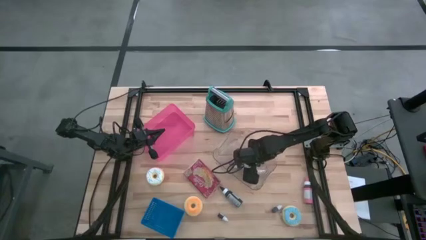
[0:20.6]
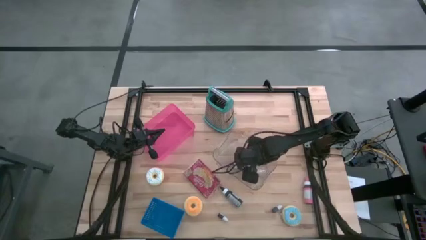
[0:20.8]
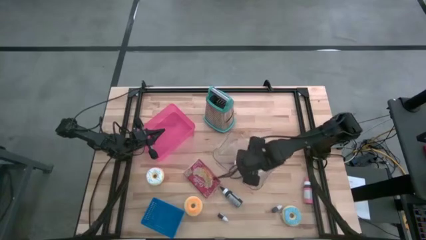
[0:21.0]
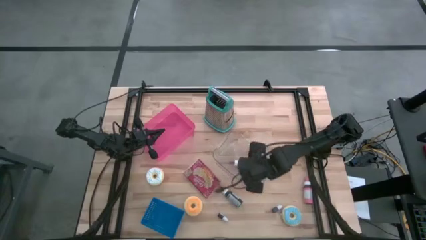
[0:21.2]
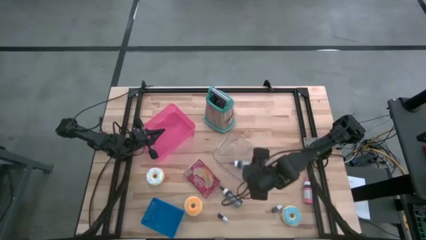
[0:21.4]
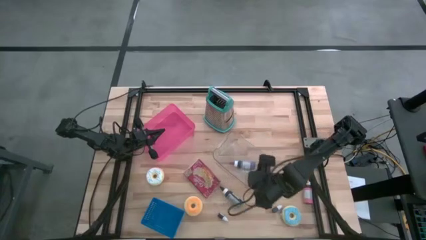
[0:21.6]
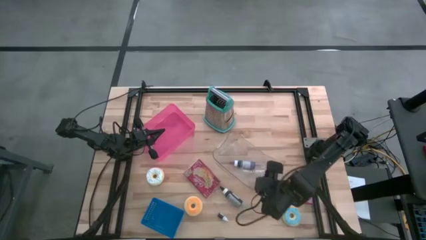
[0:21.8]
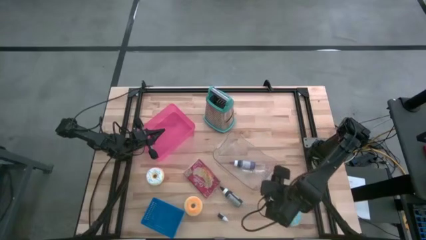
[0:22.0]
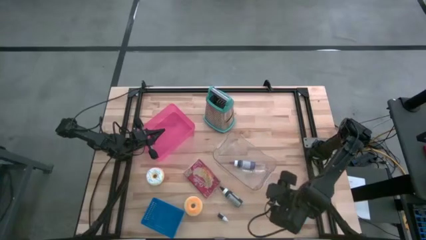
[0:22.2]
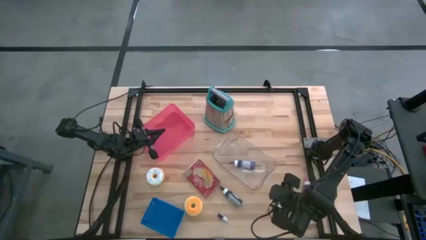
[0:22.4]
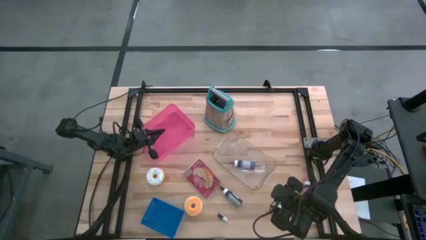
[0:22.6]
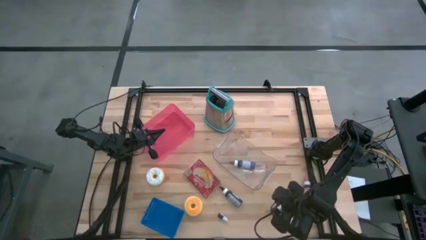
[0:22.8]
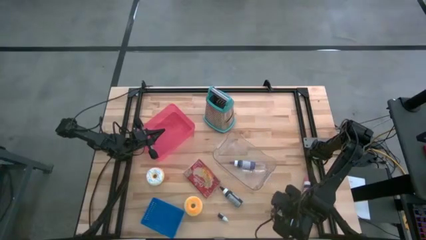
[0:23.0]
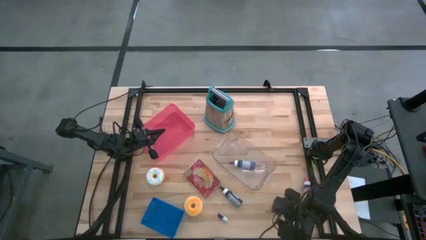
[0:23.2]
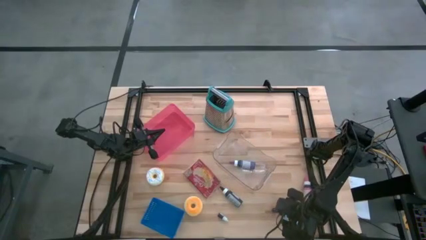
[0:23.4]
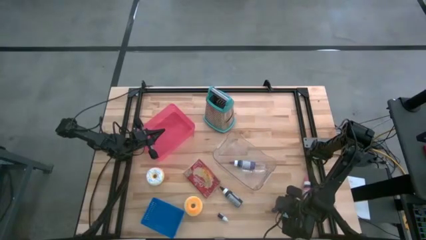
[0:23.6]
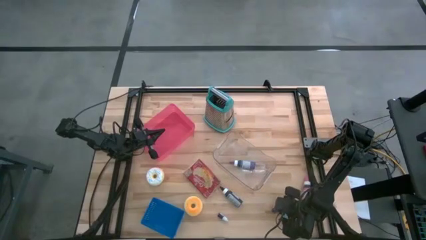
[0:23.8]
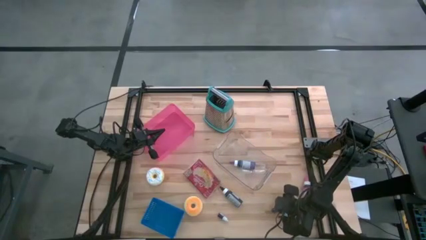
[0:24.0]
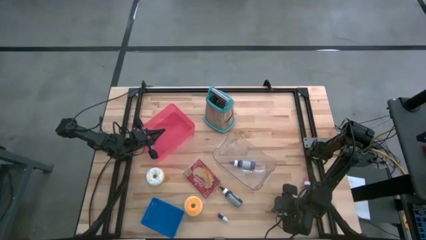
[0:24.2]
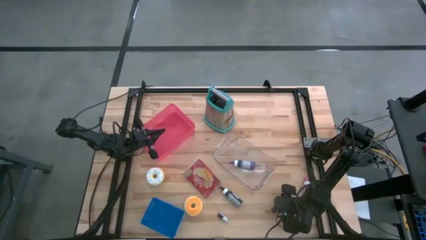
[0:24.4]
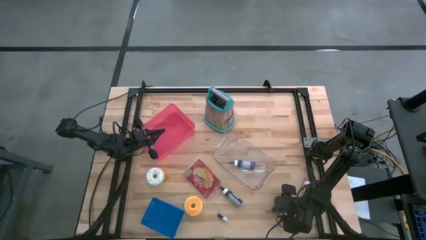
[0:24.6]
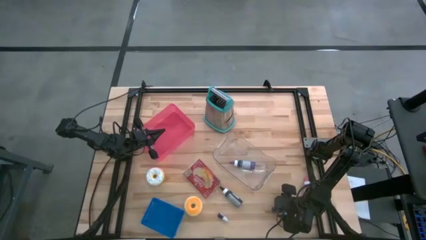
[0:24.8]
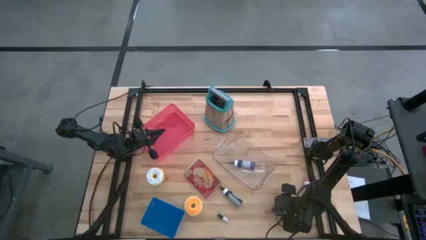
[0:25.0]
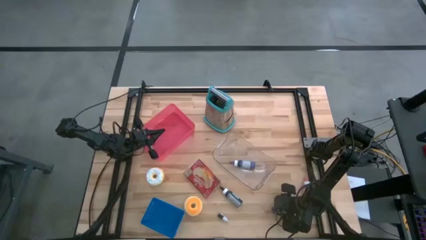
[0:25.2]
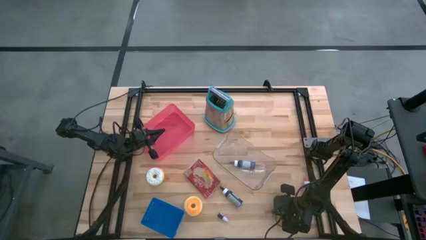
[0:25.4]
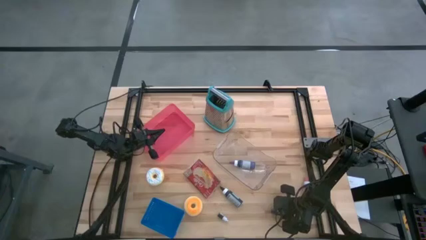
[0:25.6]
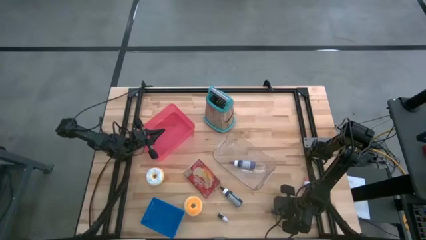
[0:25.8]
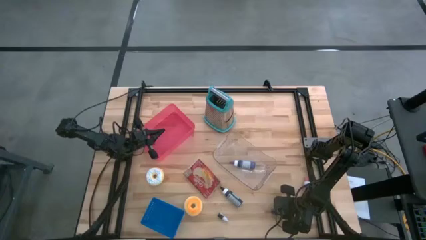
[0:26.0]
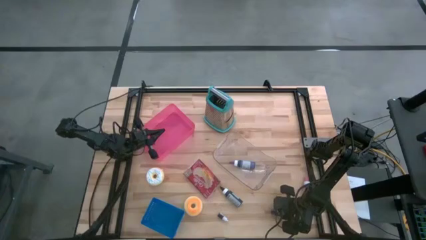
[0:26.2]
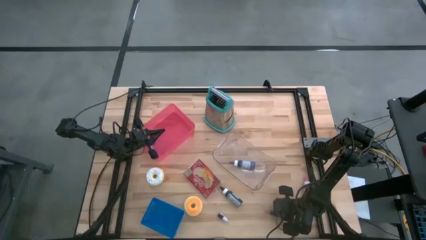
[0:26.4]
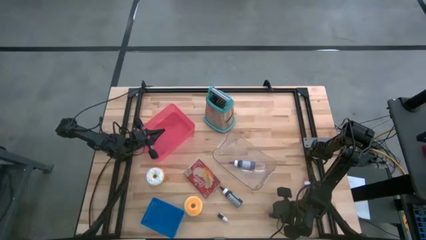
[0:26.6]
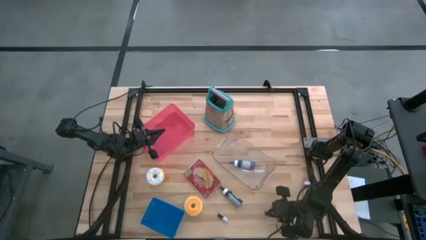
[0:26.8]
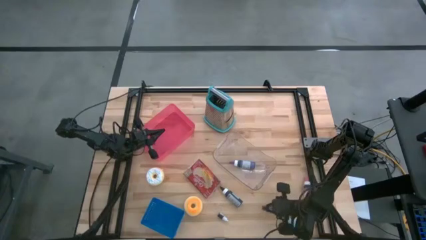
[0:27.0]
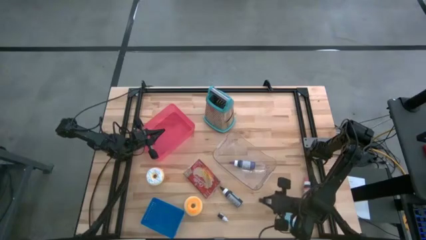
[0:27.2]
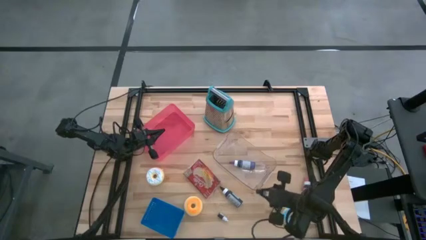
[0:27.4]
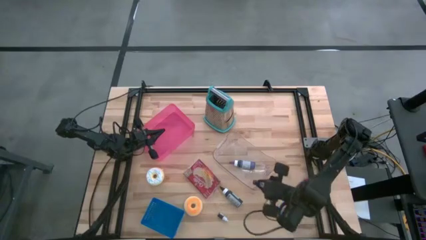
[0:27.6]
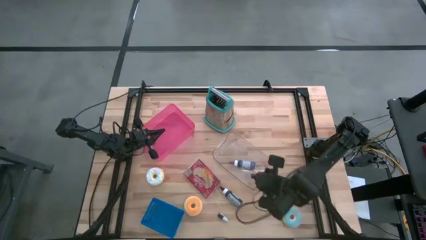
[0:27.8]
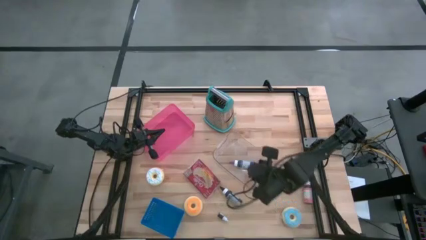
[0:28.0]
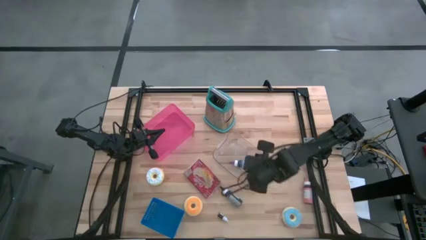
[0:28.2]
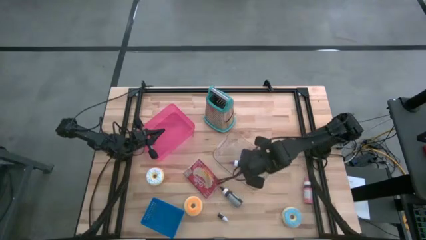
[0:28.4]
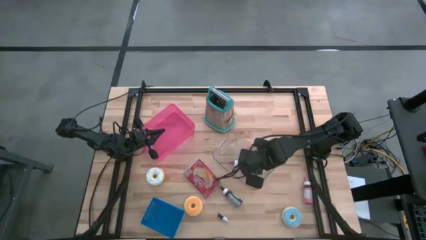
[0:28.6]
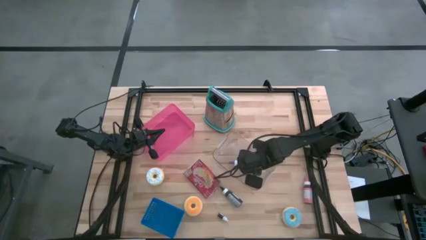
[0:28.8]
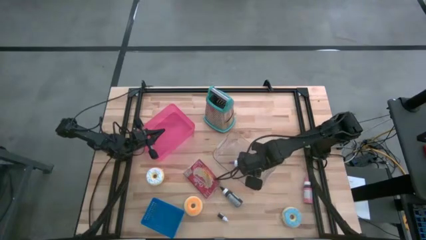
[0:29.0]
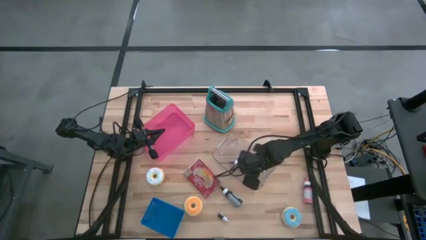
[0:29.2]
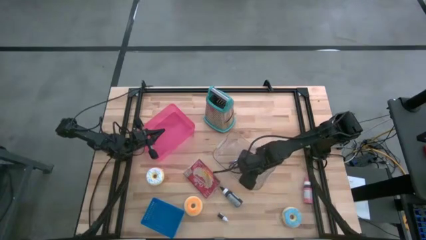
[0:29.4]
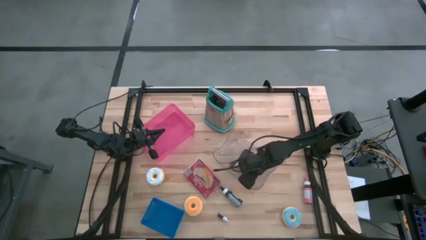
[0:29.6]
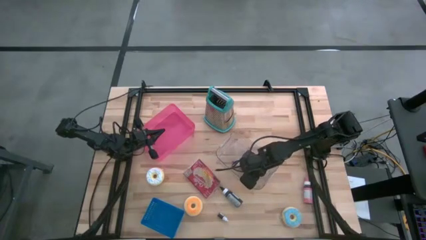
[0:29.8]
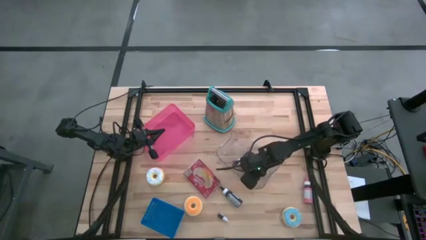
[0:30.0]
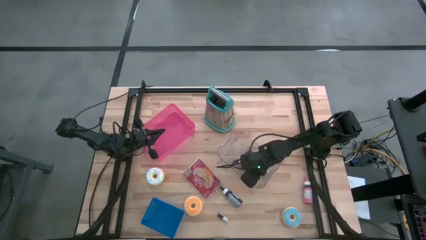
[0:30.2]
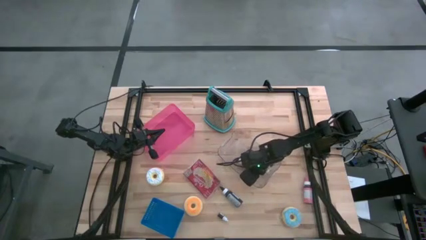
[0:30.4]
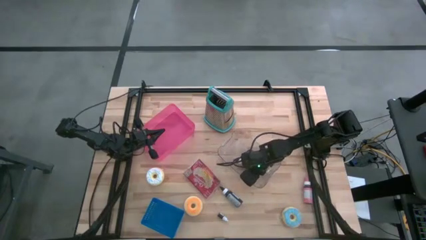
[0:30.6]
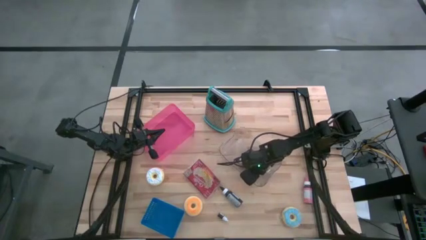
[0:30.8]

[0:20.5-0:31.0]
Task: Pick & Place Food Item
Put the small violet food coloring bottle into the transparent bin

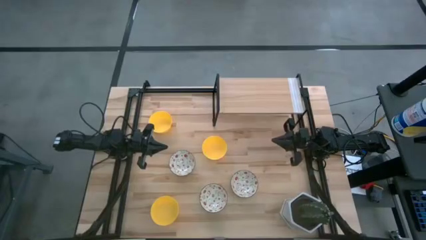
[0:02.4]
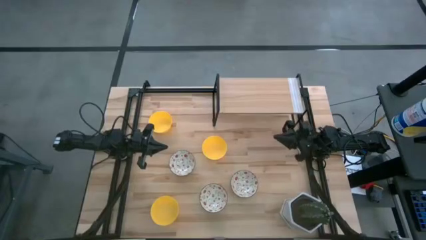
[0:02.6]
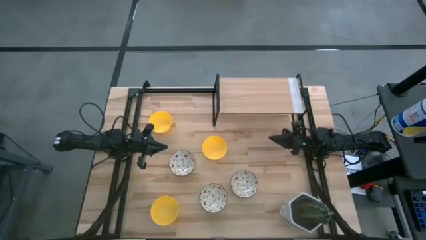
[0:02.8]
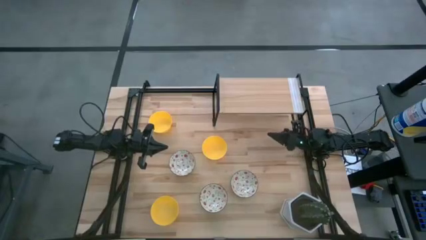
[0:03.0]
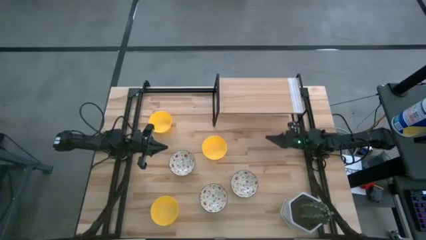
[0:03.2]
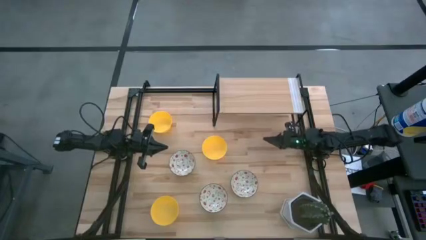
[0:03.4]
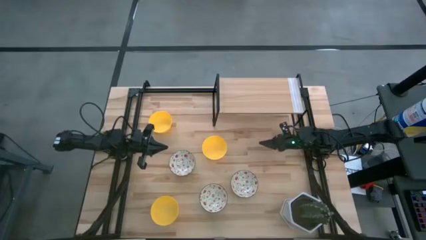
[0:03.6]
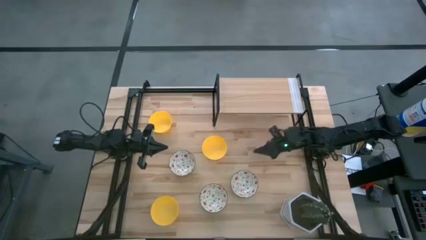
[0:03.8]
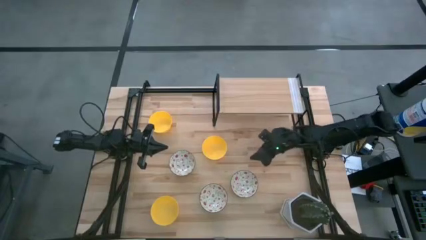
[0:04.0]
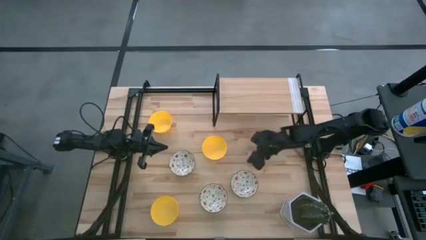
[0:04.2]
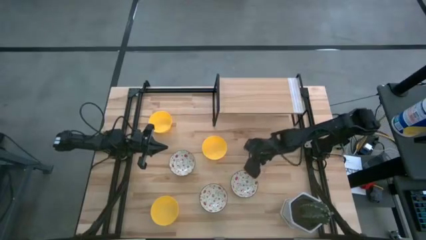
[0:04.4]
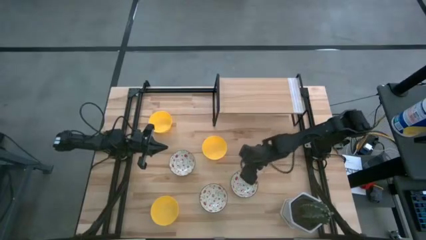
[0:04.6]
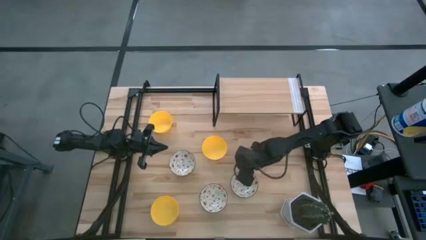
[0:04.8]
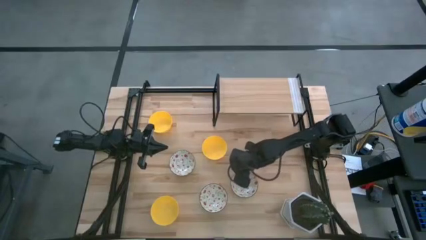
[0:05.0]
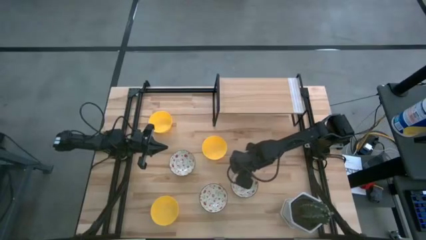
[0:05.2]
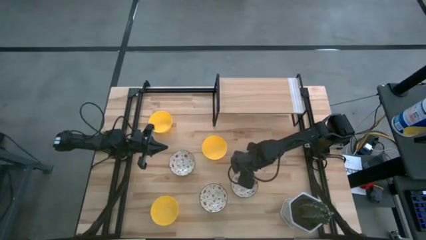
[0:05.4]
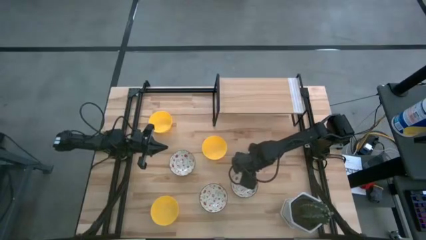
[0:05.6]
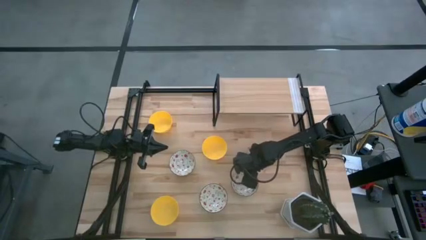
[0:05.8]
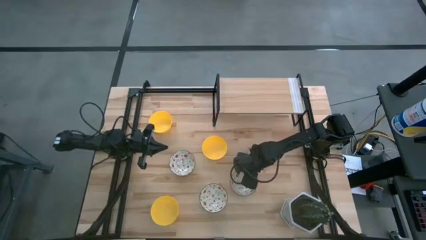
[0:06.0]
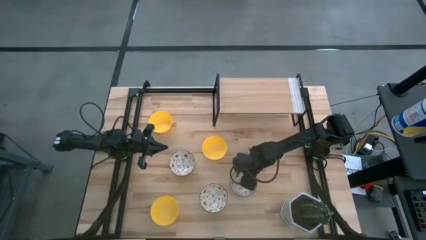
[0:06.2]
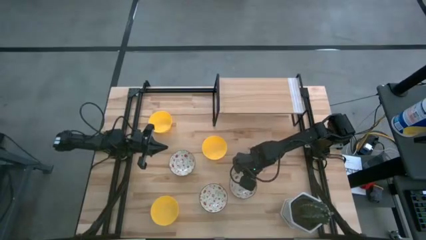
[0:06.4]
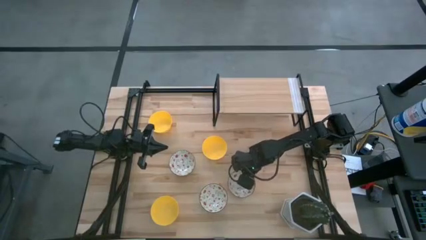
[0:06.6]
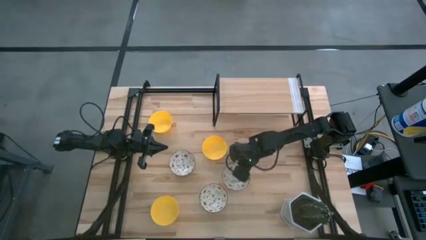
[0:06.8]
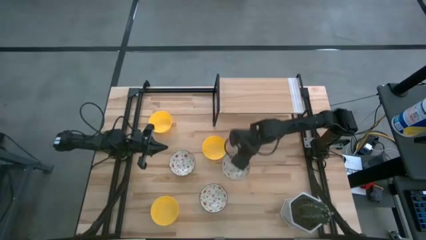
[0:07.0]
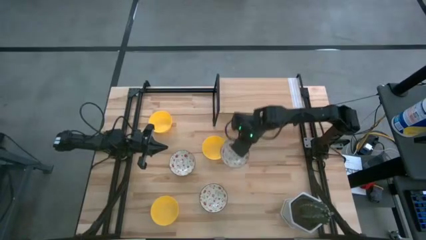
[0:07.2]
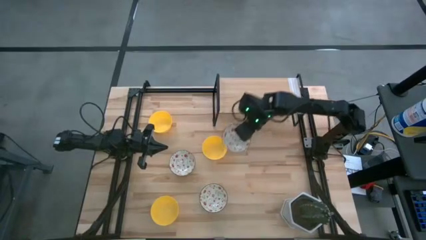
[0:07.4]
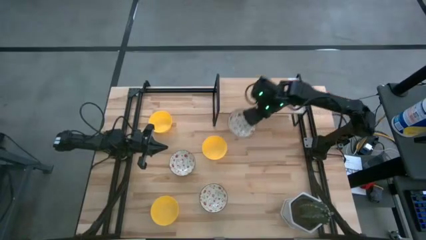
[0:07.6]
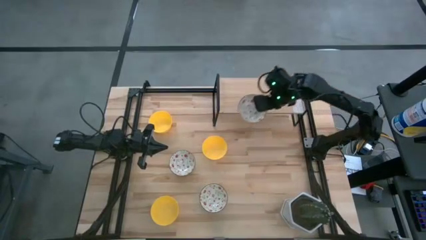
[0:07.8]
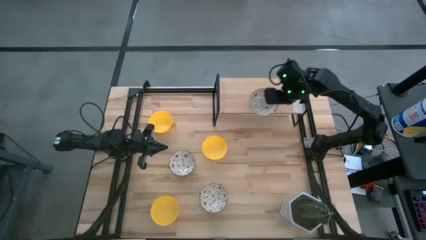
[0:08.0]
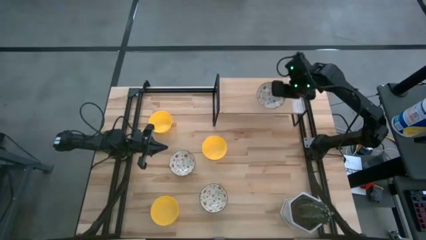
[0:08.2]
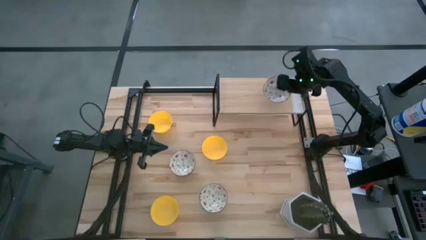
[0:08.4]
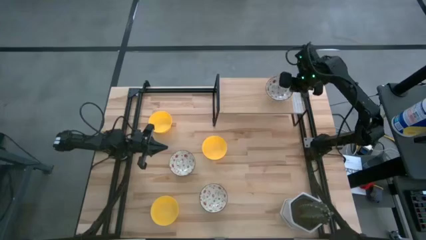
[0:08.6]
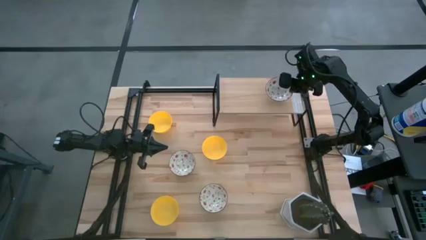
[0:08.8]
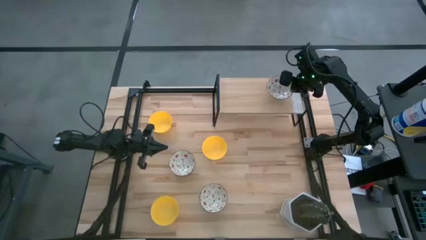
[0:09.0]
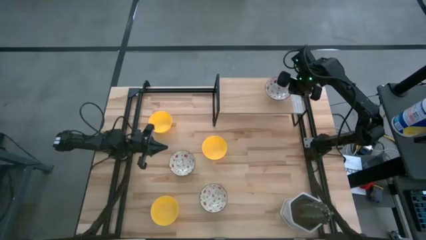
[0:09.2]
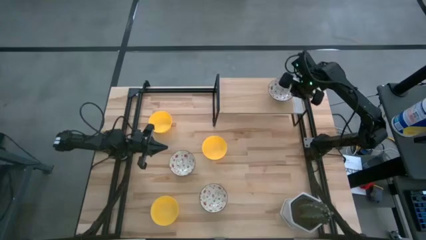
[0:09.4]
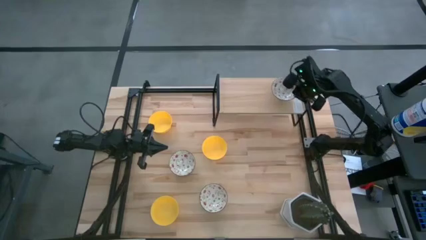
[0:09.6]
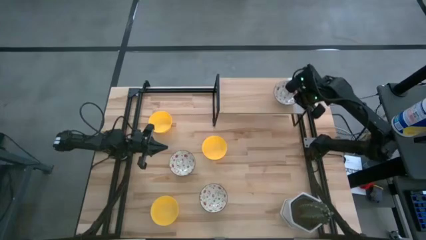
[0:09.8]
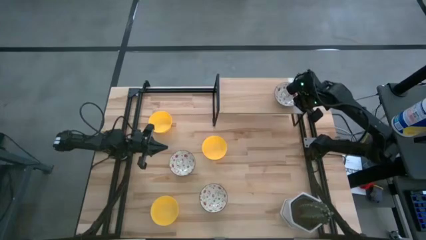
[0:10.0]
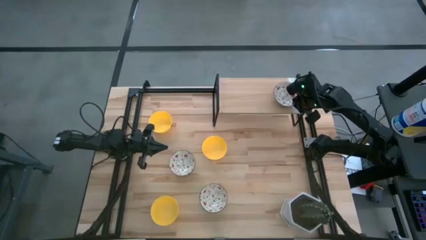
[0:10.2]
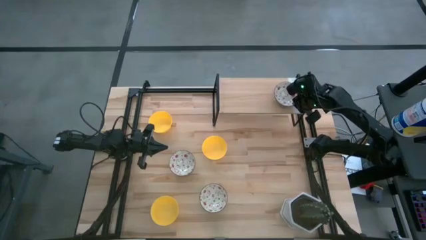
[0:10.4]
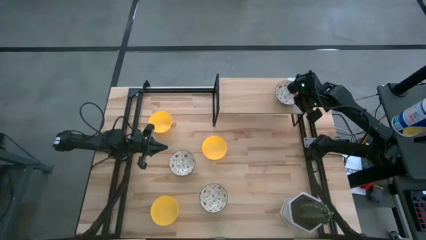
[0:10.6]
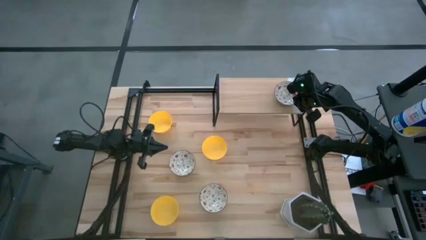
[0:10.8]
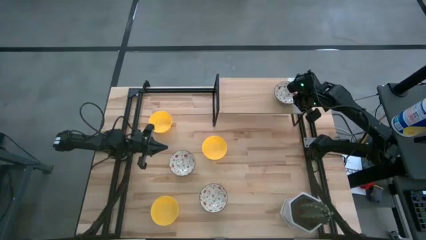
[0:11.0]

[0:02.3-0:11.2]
Task: Pick & Place Mini bowls
Put the right white patterned bowl on the shelf
